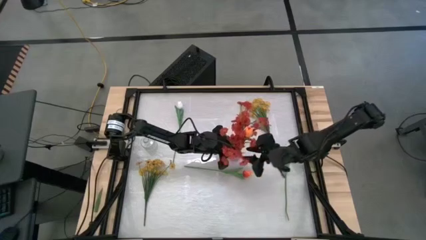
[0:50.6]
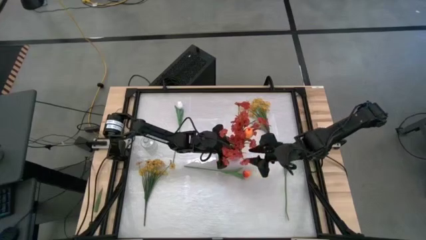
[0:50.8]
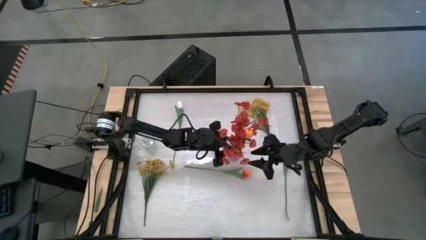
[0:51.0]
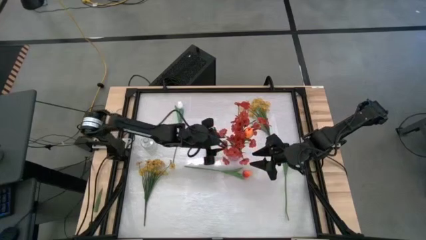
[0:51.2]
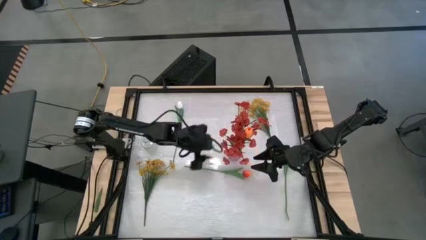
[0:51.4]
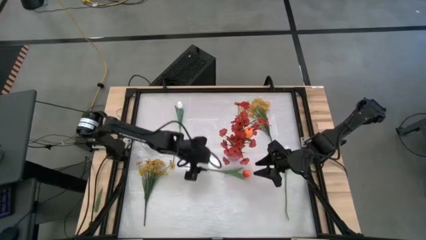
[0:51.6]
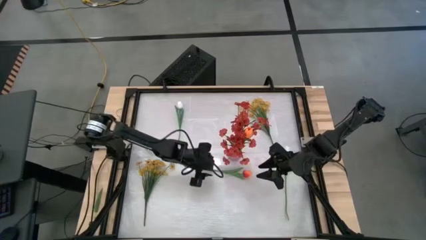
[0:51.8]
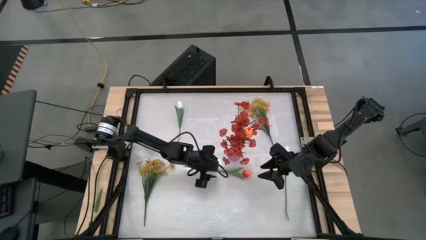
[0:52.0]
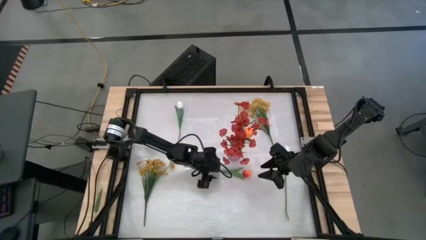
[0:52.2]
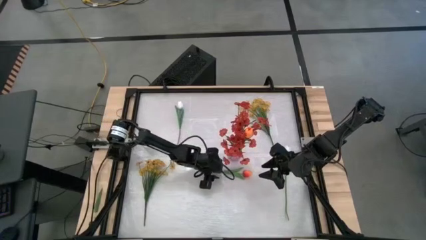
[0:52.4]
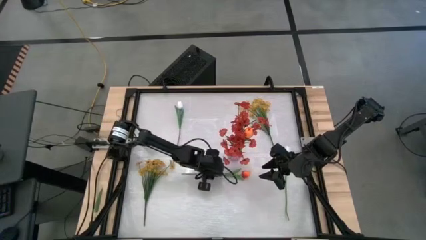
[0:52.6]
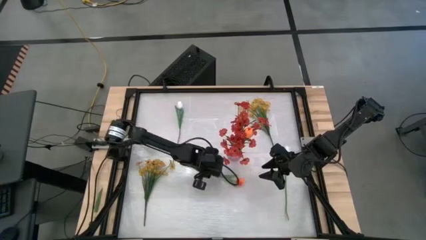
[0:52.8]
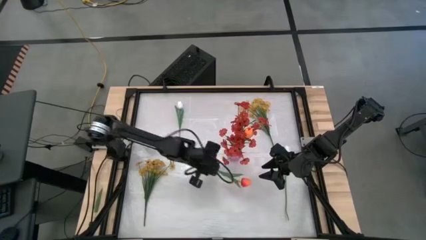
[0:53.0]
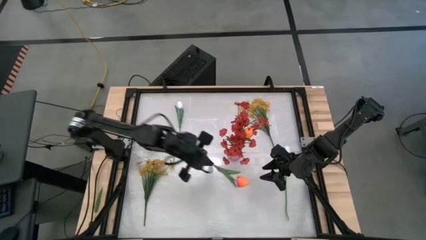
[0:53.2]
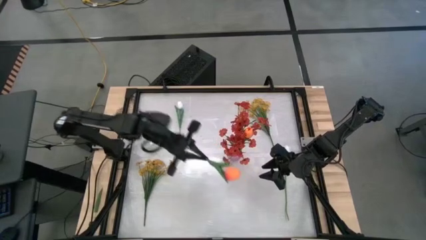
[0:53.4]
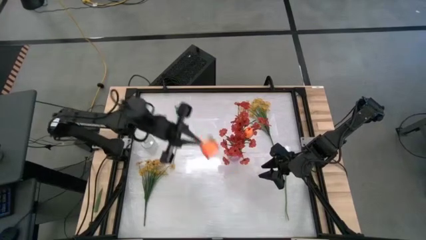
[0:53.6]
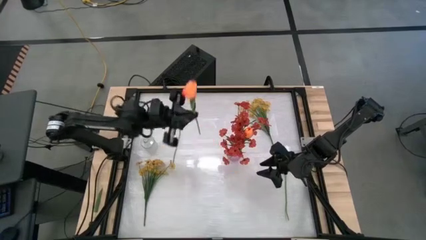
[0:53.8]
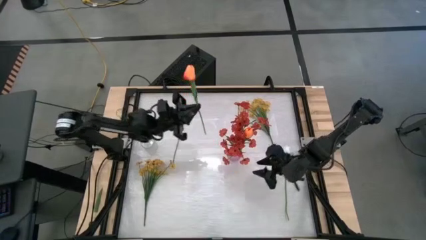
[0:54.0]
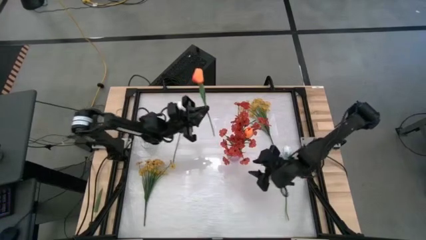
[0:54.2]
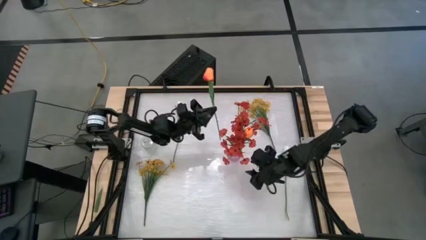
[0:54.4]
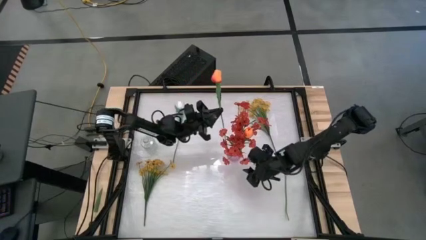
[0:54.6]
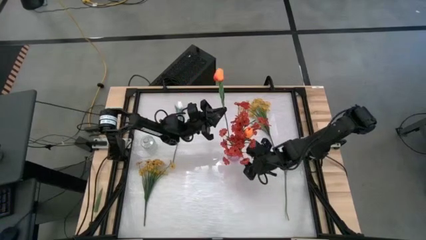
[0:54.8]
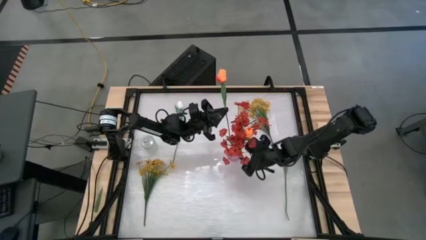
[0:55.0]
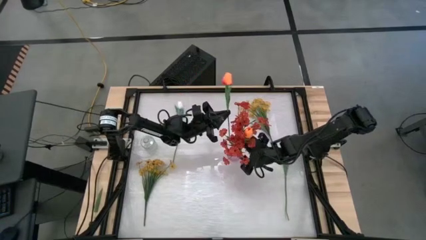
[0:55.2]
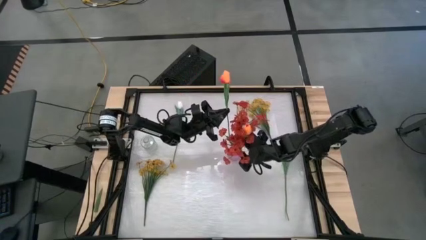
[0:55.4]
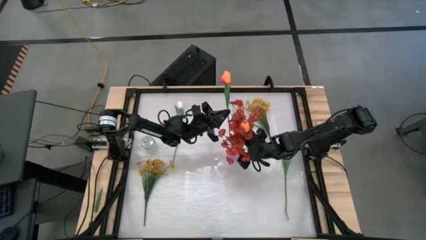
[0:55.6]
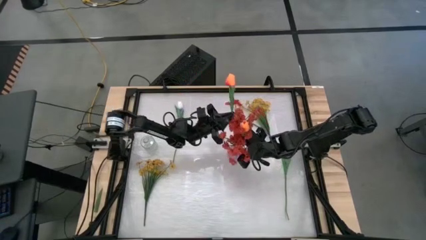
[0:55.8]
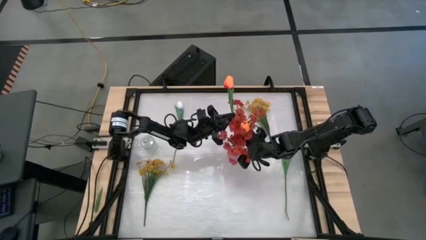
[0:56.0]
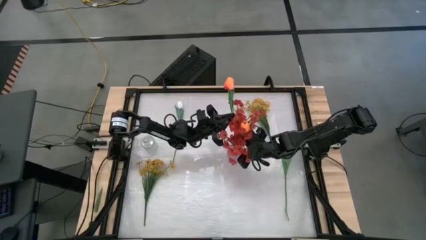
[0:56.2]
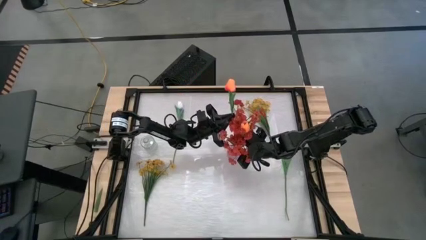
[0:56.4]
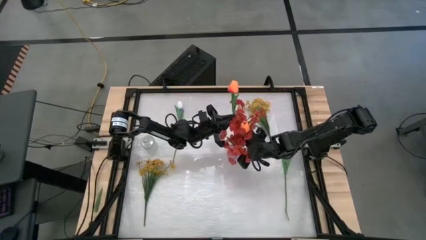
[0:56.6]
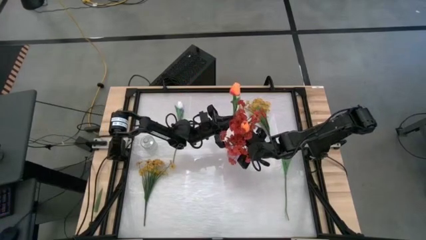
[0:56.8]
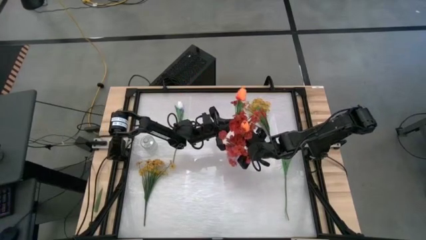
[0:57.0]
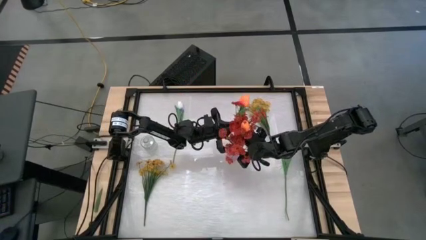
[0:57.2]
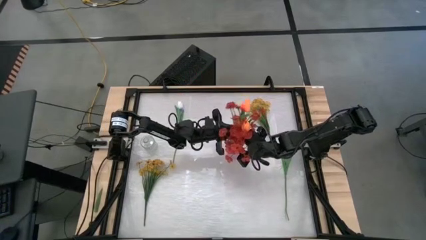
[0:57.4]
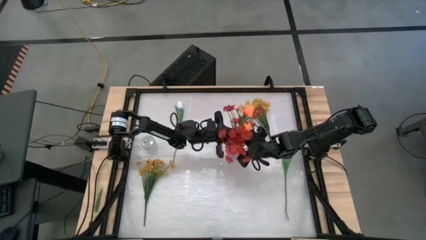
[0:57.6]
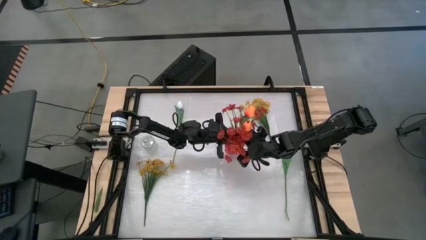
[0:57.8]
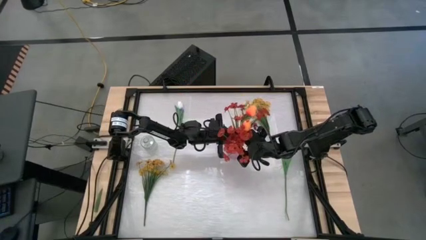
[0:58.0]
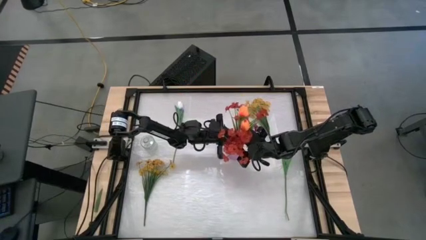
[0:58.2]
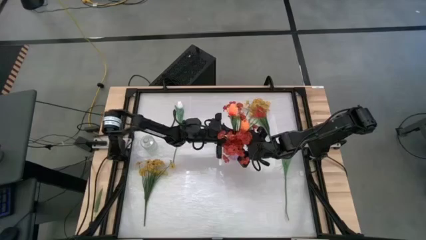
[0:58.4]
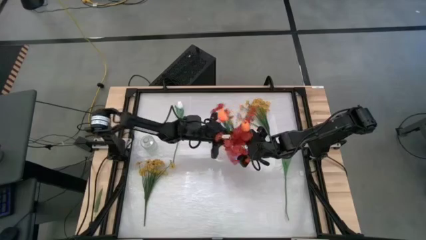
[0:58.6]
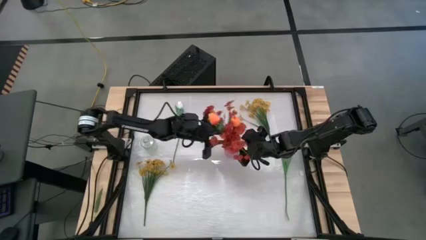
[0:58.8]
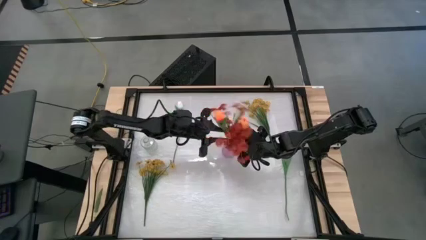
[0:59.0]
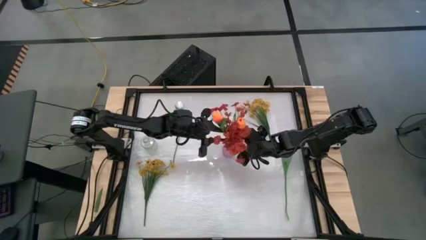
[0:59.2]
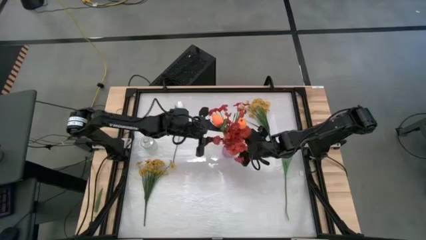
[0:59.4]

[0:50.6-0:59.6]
Task: Sort flowers into vase by color
Put the orange flower into the violet vase

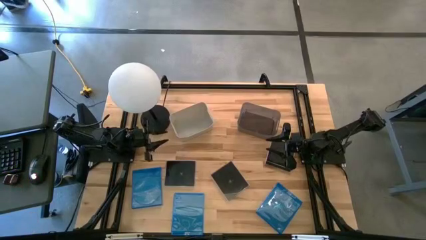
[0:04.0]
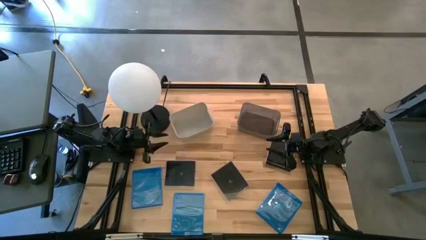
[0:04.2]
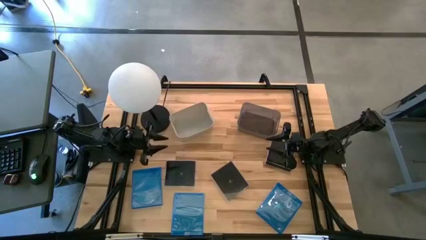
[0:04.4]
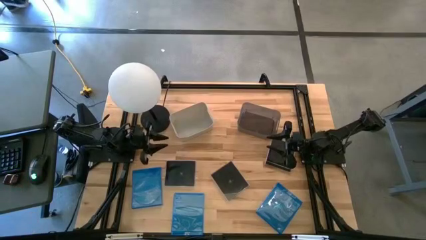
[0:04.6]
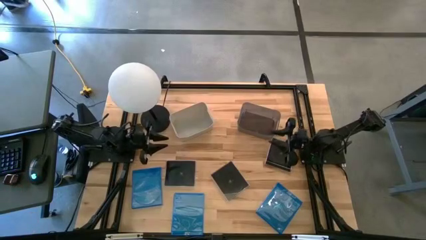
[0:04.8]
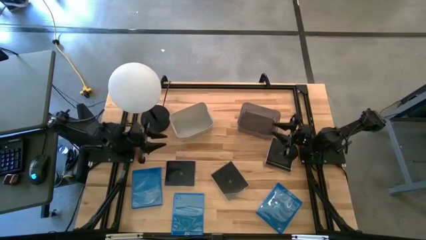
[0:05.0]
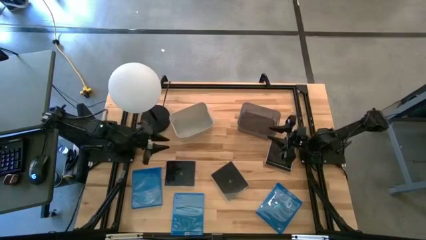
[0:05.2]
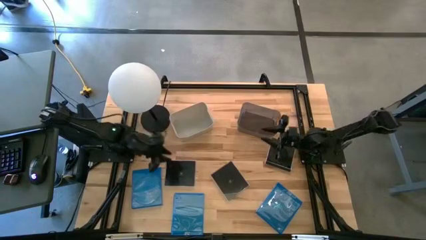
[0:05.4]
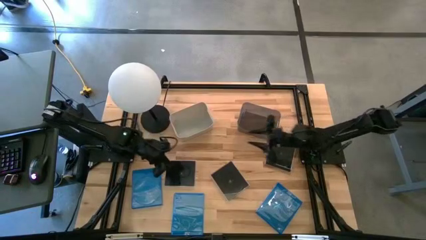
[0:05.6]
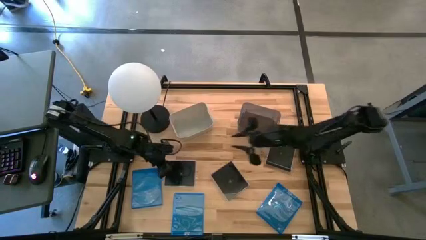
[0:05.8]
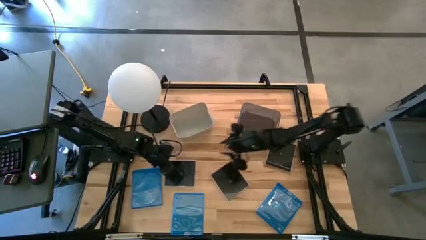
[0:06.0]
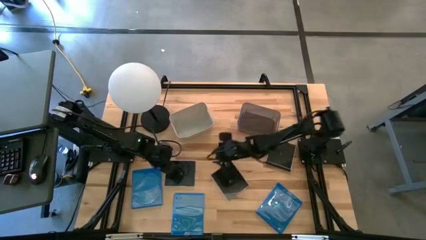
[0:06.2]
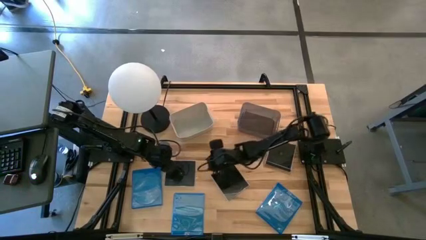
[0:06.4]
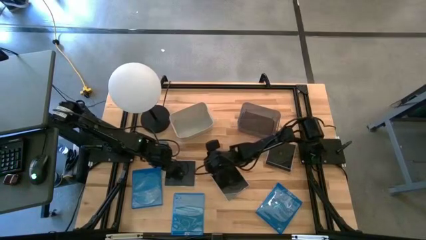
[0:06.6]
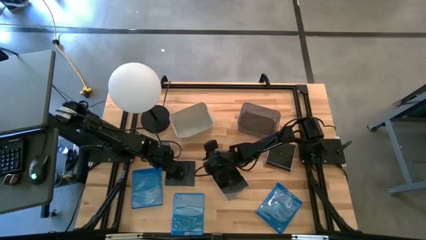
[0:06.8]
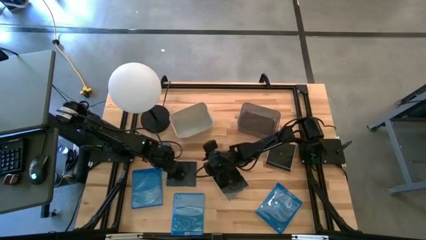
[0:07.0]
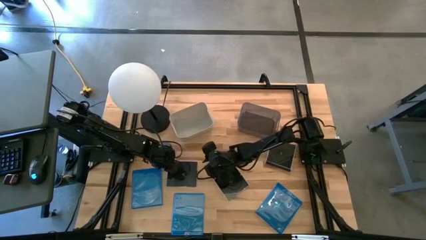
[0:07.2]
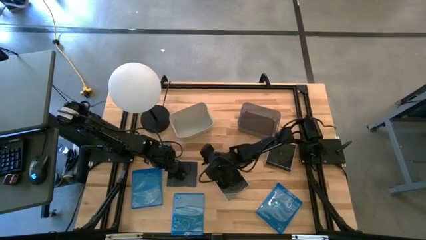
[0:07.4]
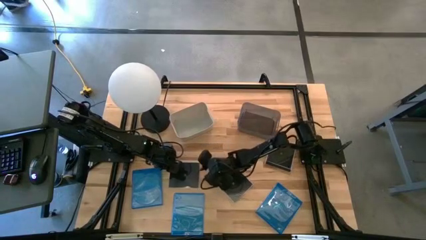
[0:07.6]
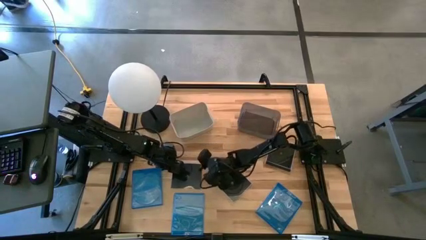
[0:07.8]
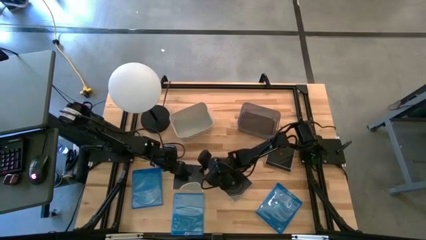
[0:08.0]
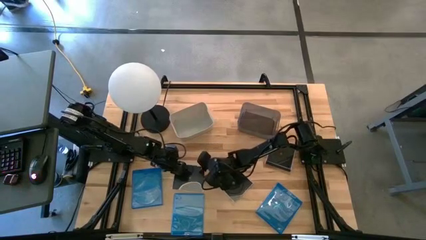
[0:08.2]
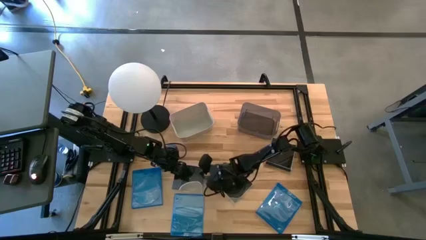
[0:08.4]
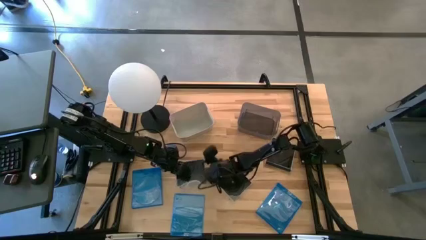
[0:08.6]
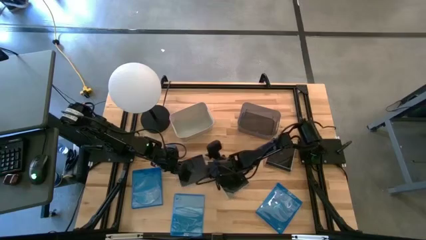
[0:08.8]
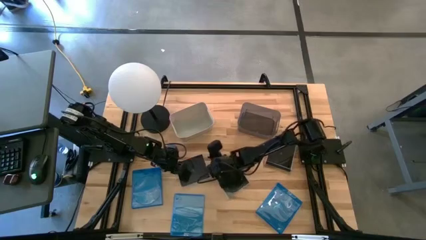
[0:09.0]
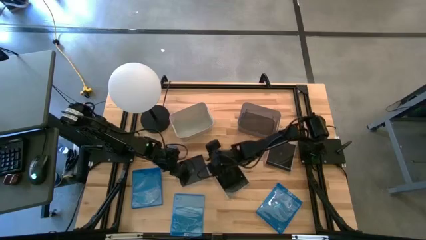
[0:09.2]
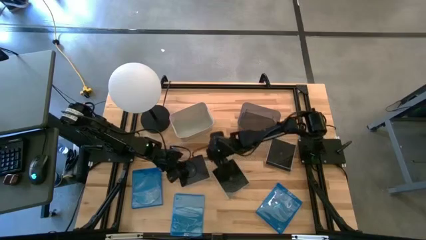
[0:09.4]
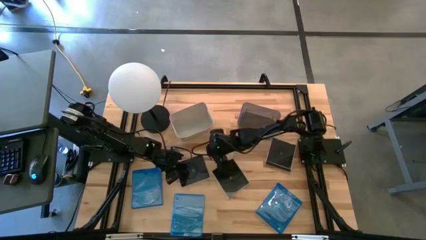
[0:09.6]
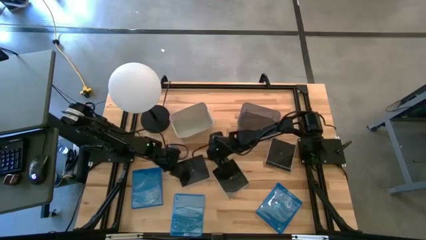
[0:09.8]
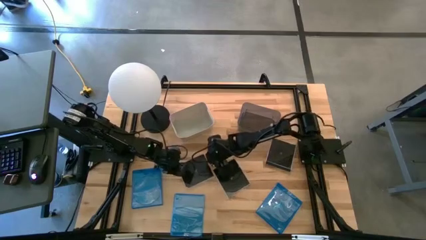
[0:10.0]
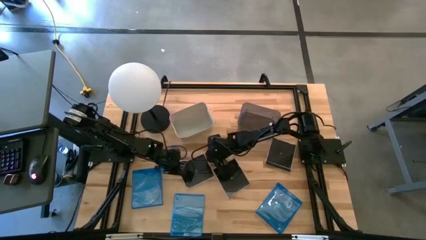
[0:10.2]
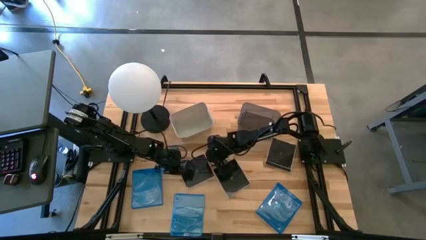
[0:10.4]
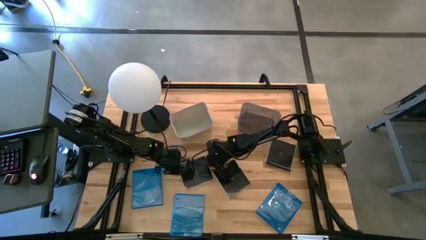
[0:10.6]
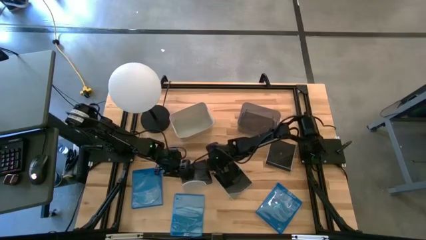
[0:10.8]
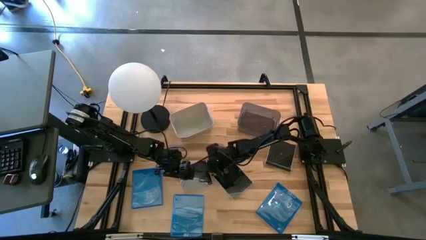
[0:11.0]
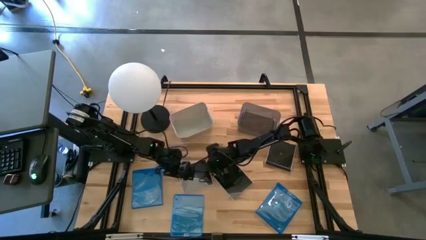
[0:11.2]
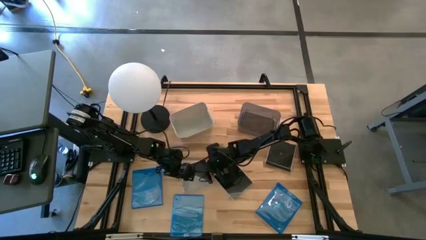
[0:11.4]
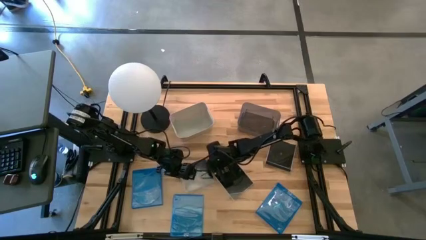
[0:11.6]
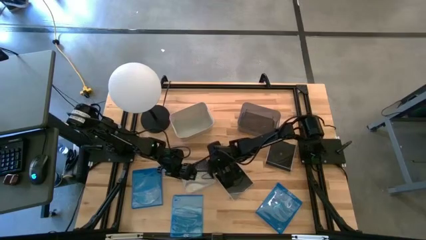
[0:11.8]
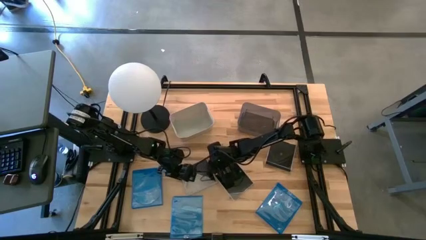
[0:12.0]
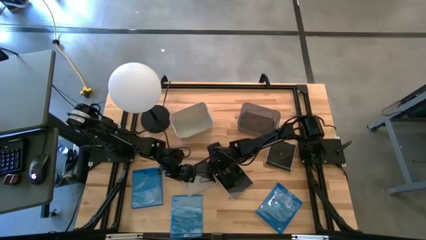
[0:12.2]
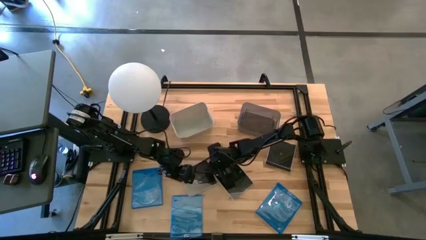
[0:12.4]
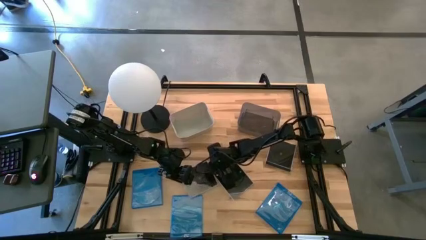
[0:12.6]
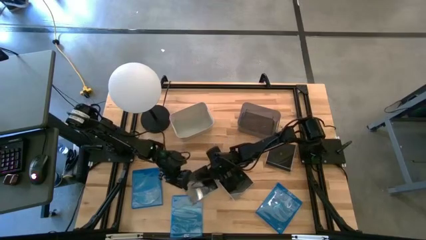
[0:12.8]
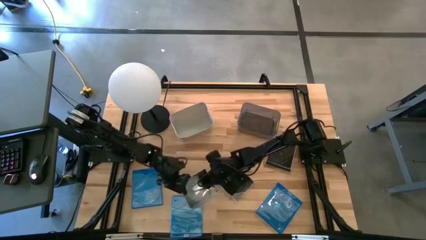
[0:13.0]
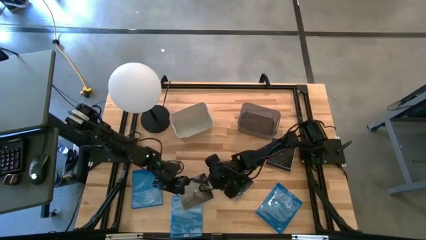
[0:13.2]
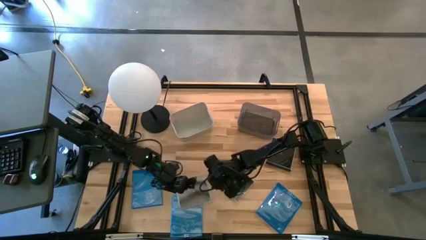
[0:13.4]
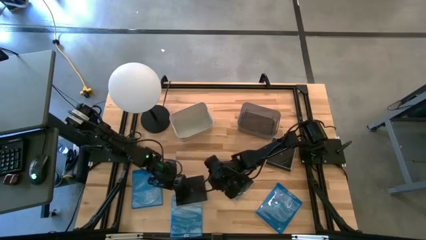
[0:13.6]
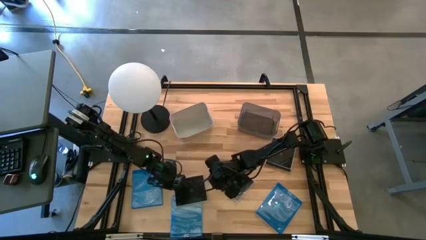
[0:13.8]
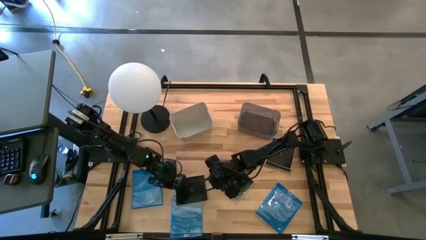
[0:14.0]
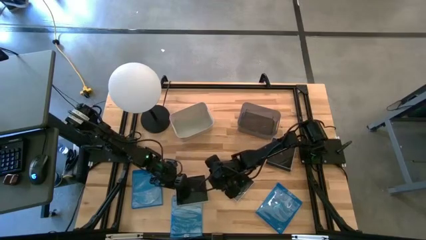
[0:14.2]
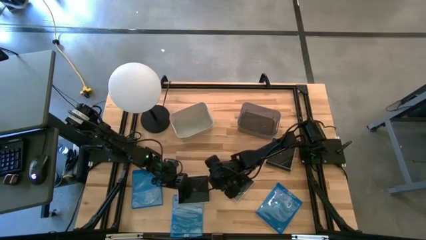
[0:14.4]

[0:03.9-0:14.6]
Task: Pick & place jewel cases by type
Put the bottom left black CD case into the gray bin
